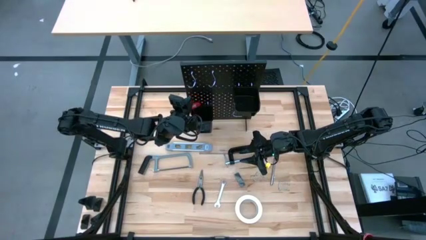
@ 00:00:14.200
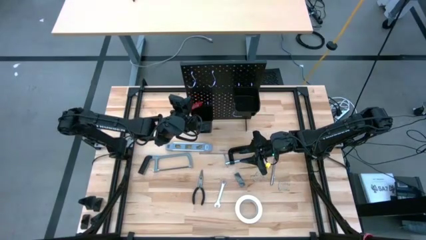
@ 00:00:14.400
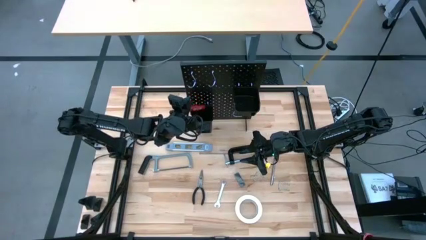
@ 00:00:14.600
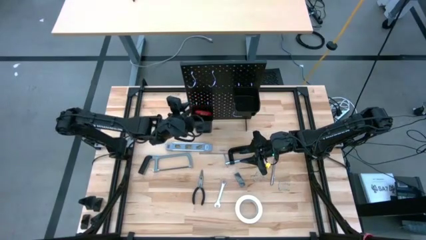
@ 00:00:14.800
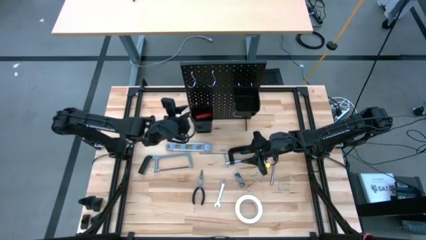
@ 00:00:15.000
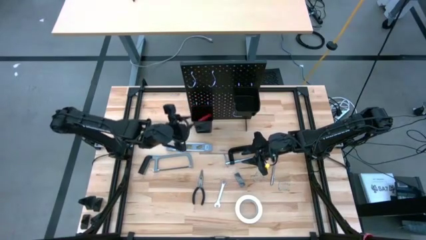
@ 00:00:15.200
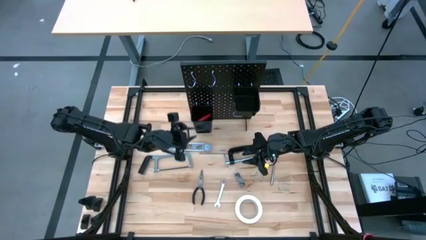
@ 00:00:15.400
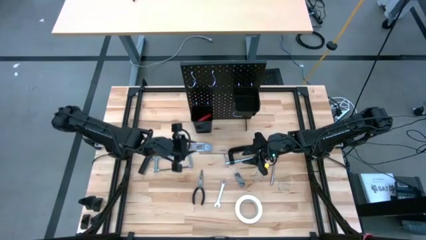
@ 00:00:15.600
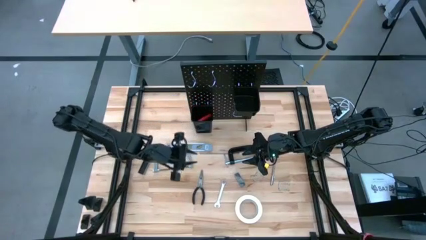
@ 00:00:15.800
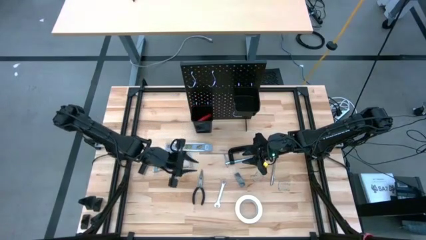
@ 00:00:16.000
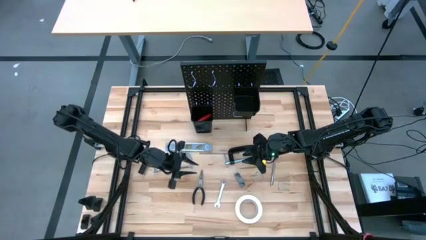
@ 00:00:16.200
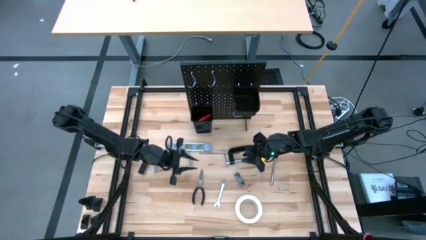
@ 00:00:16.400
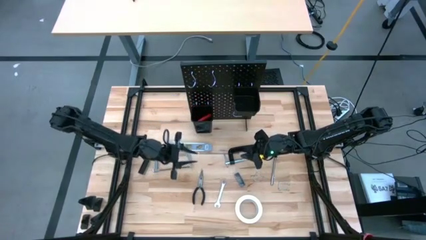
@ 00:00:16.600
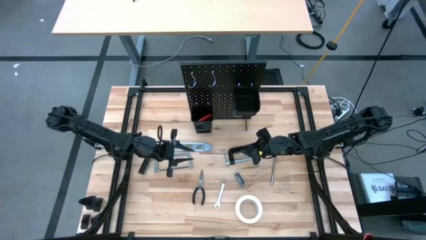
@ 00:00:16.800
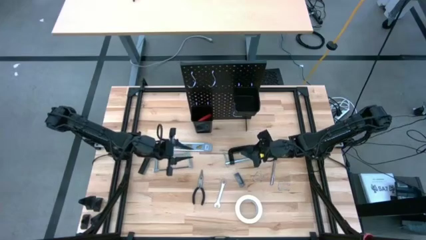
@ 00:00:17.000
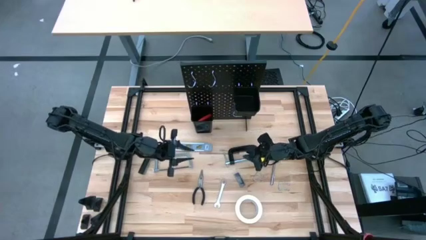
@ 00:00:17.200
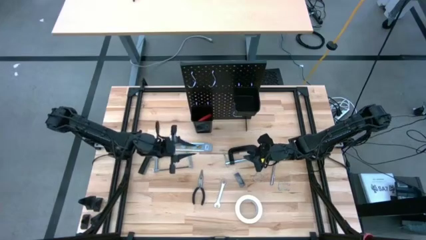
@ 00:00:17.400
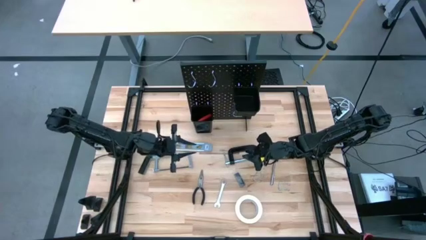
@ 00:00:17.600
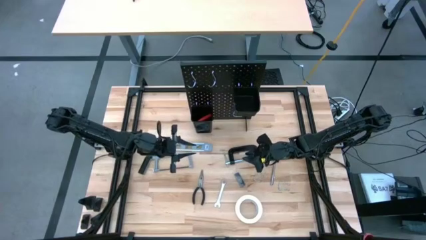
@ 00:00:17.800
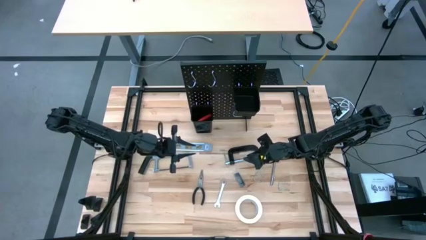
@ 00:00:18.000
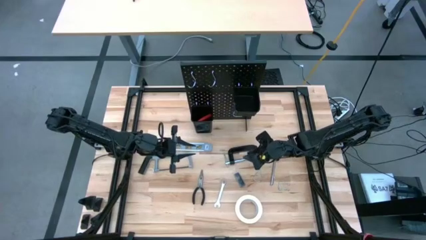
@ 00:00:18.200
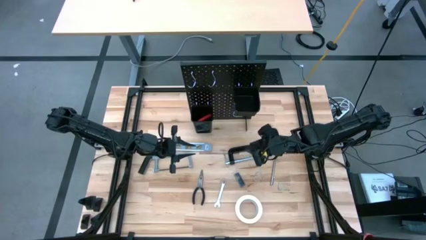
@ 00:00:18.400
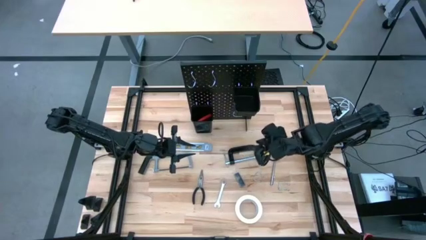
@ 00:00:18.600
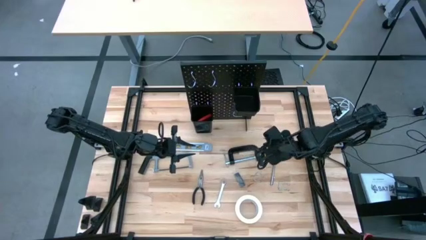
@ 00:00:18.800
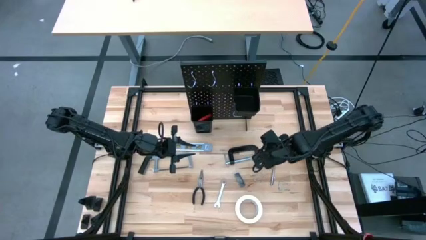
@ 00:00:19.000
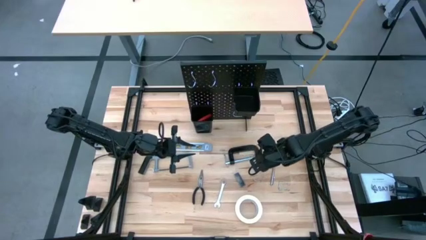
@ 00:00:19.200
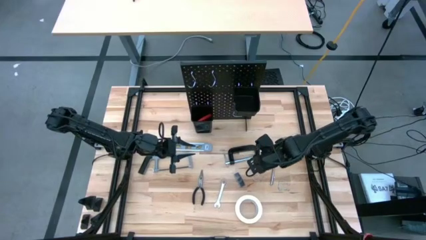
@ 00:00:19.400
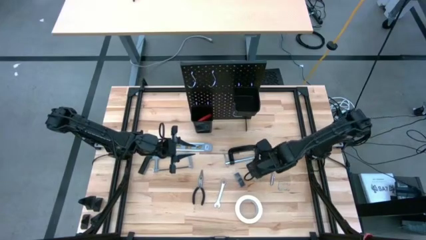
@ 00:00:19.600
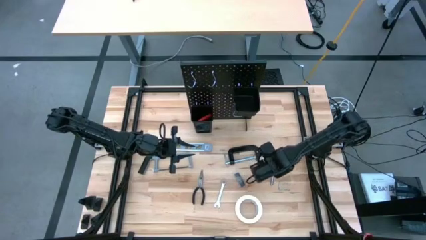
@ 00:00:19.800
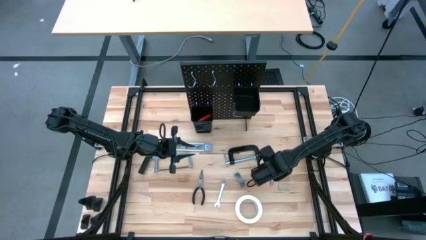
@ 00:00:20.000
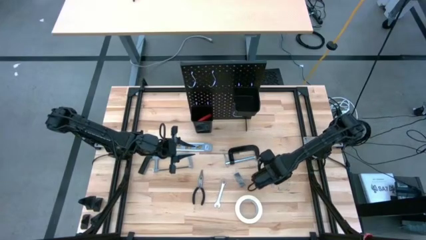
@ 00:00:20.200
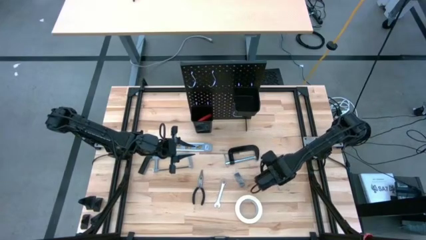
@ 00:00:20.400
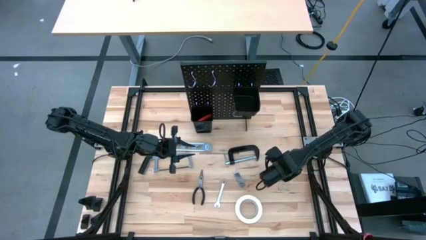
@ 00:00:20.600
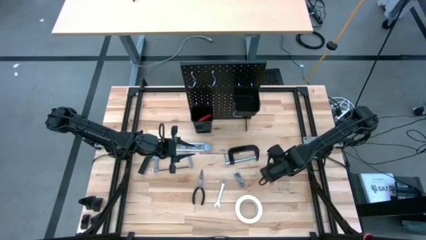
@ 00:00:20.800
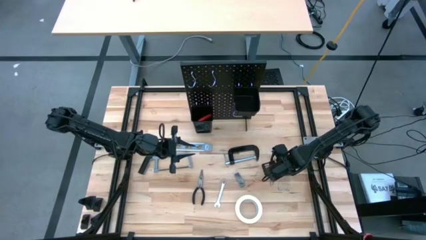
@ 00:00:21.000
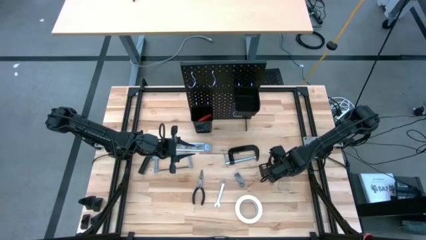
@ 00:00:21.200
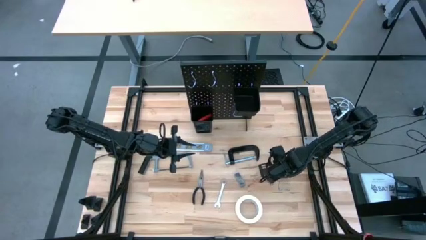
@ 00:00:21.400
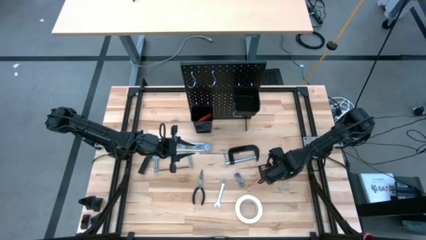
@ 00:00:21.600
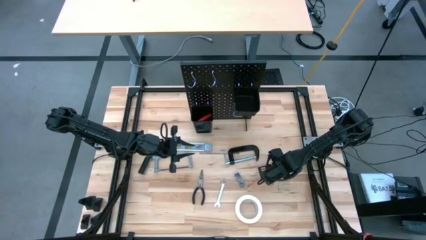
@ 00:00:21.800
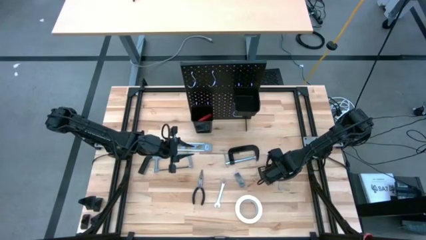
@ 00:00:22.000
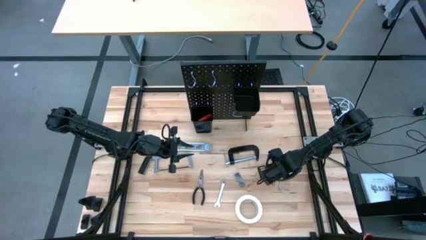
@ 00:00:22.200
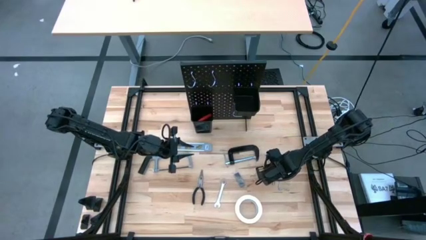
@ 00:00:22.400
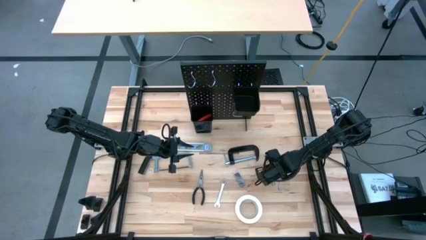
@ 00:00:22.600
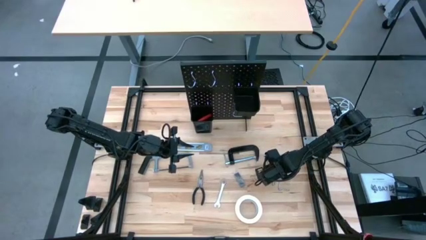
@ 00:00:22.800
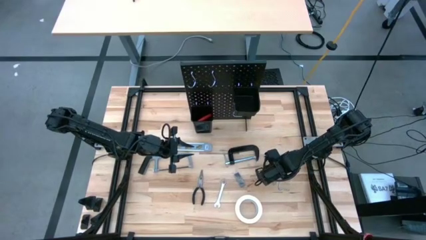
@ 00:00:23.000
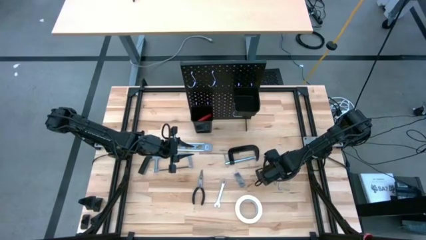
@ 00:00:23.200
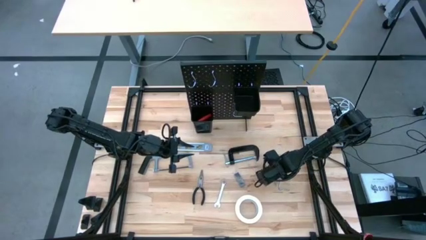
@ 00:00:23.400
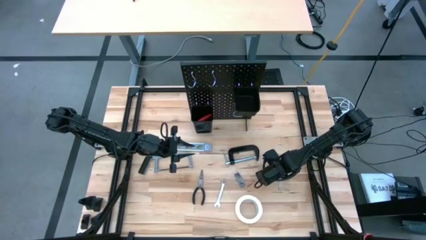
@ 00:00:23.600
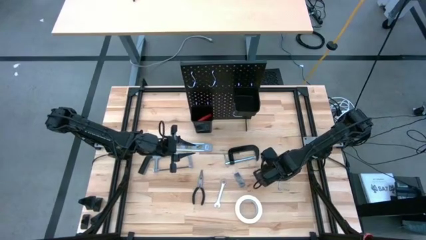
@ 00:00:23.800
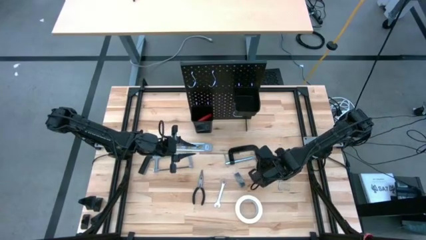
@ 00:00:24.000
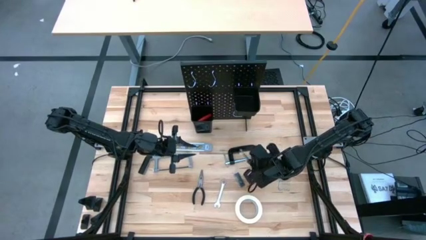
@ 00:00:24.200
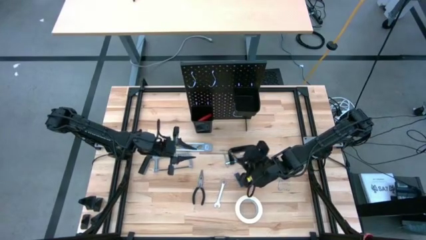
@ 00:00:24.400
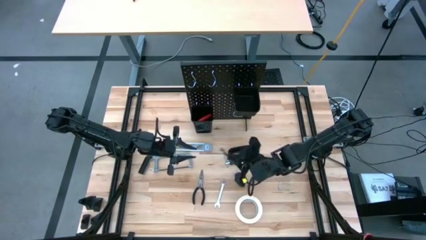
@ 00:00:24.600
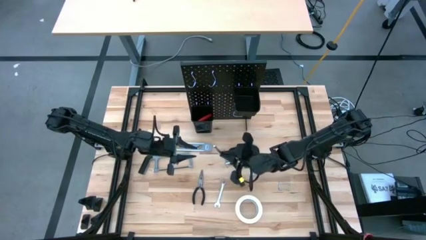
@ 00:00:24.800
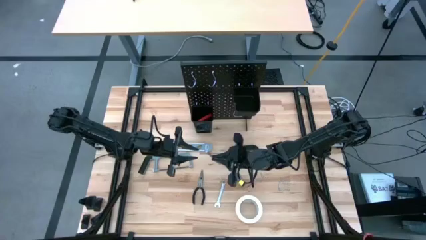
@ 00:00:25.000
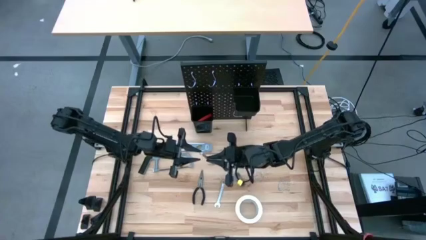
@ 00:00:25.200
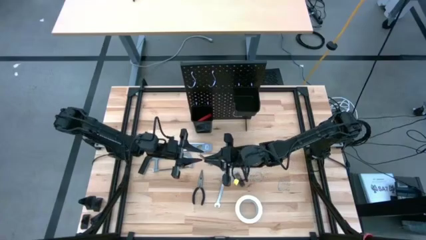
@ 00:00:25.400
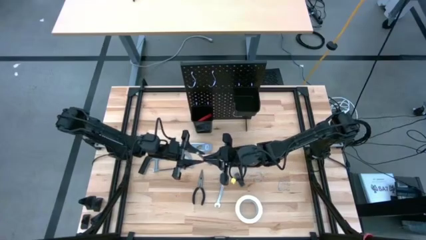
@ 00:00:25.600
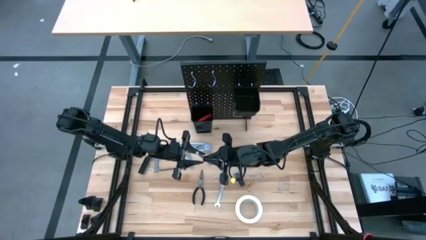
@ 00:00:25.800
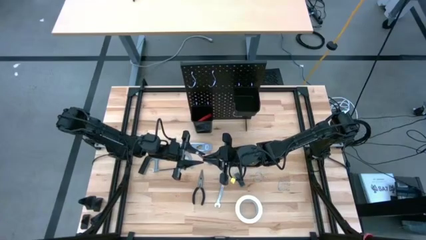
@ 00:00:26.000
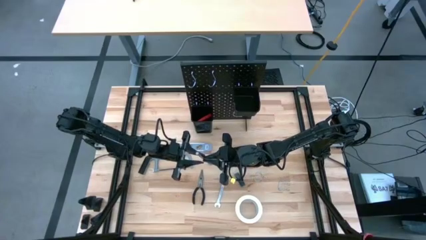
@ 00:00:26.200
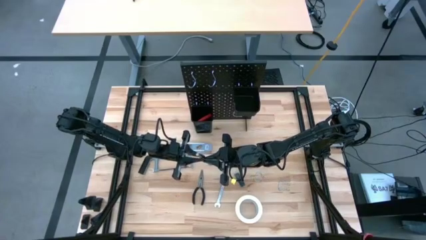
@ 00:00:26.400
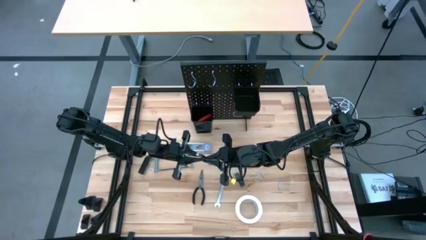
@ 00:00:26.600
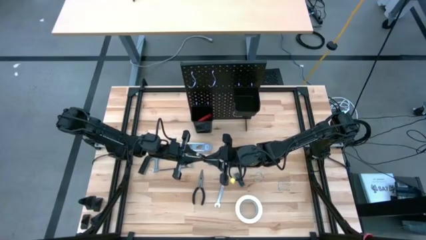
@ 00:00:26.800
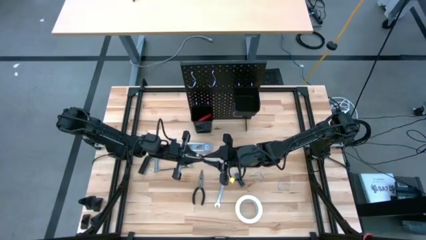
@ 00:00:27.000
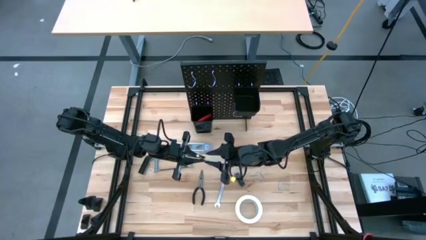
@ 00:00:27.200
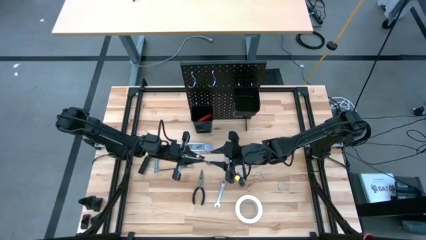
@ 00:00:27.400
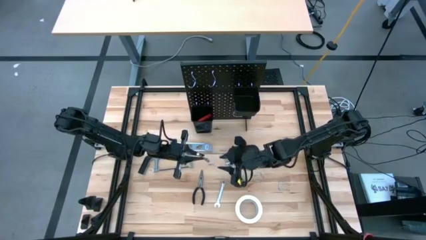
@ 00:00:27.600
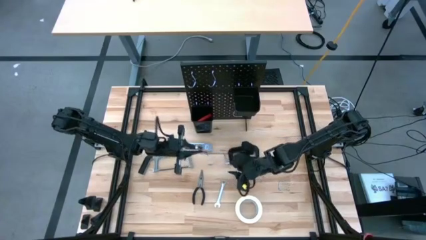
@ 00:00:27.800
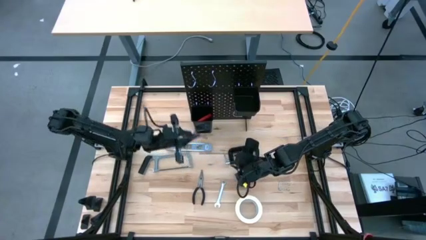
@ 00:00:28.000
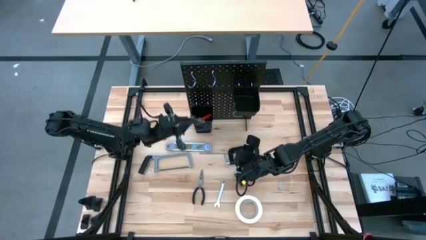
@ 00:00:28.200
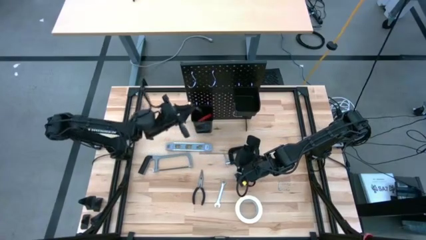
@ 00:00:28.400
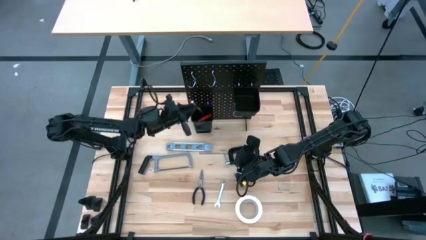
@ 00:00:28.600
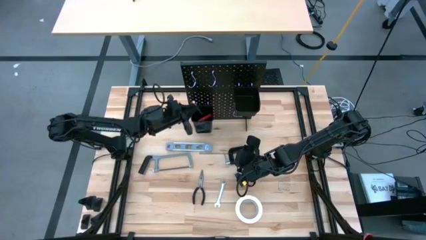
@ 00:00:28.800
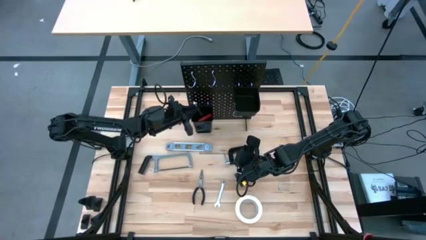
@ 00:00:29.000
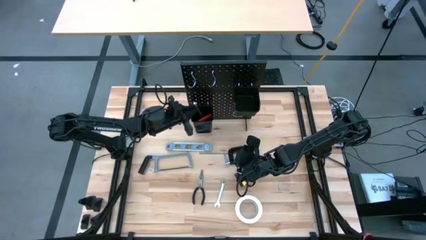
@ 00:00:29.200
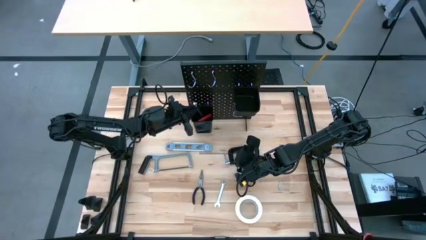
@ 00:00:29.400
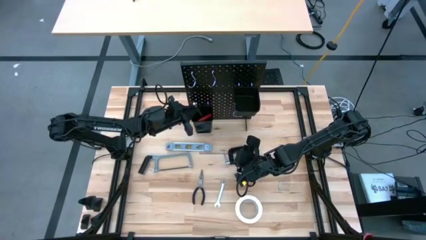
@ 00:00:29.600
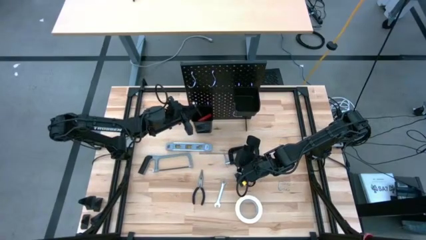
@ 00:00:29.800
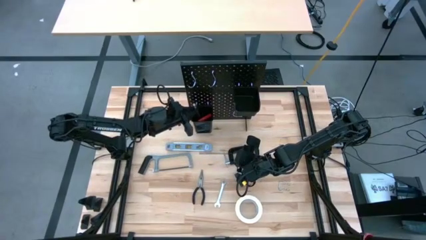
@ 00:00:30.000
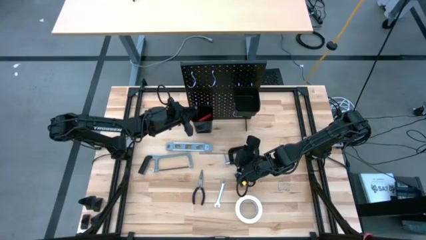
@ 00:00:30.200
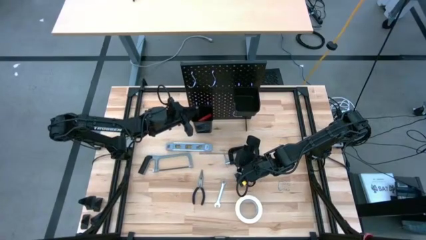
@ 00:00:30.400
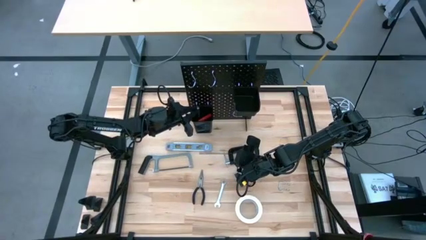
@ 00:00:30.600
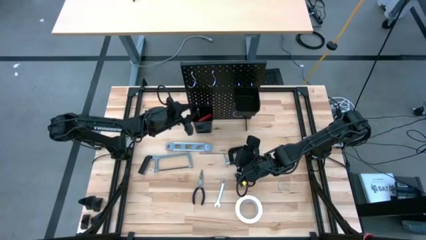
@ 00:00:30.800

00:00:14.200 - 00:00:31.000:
Task: Hang tools onto peg board
Put the magnetic telescoping tool into the bottom black bin on the pegboard
